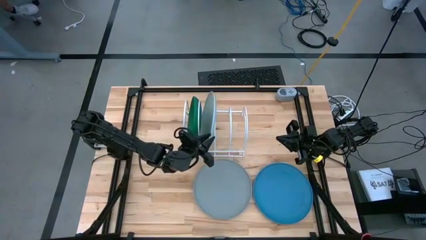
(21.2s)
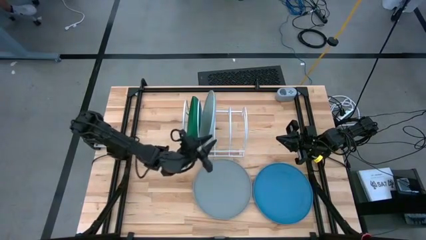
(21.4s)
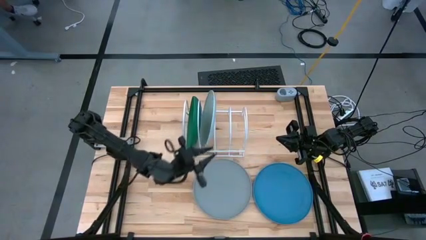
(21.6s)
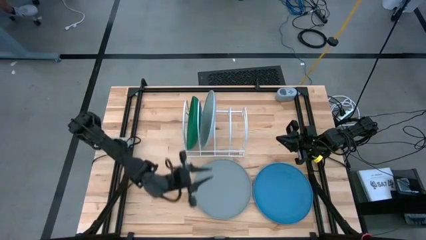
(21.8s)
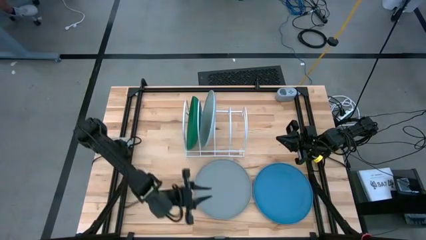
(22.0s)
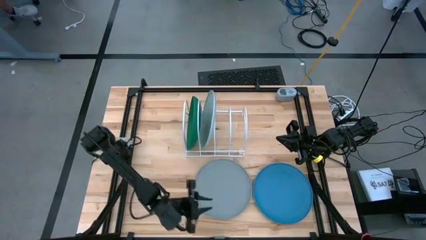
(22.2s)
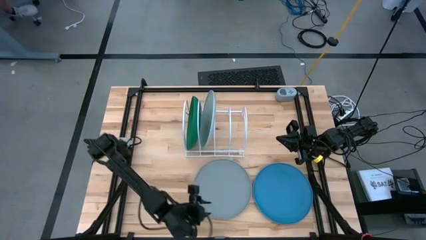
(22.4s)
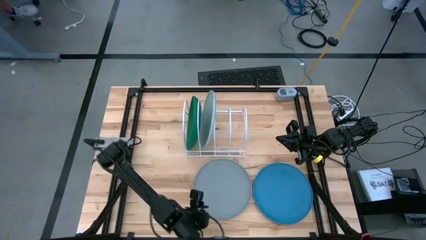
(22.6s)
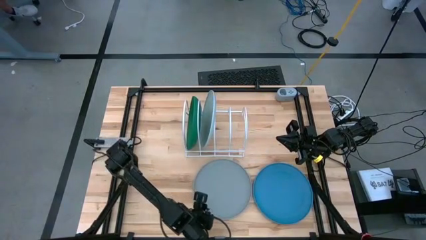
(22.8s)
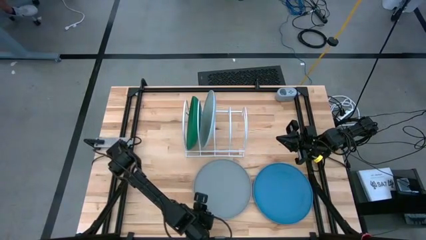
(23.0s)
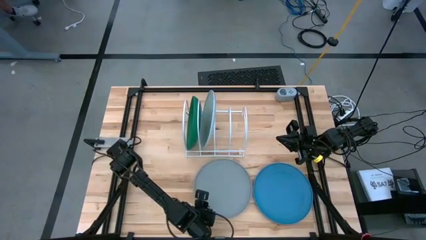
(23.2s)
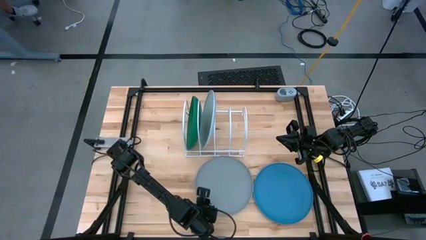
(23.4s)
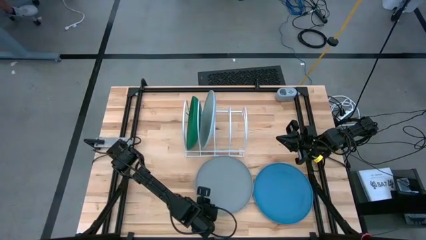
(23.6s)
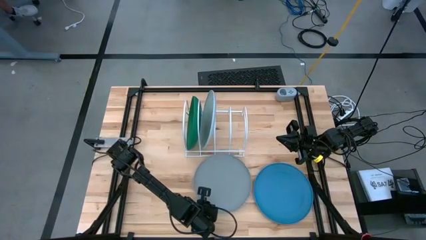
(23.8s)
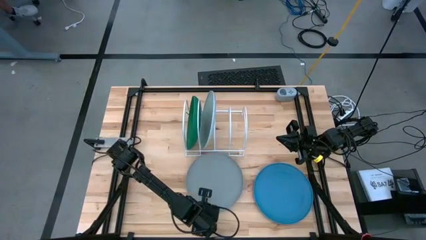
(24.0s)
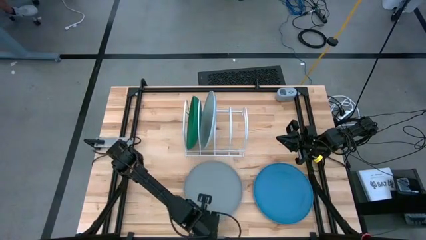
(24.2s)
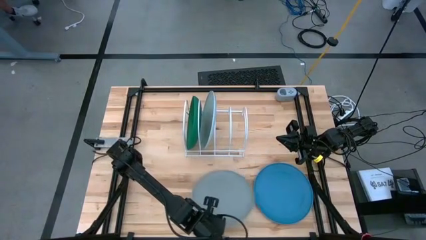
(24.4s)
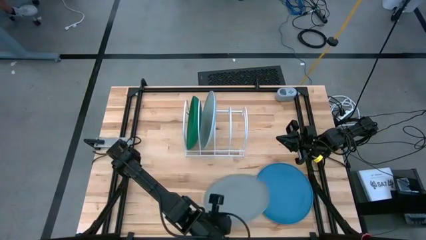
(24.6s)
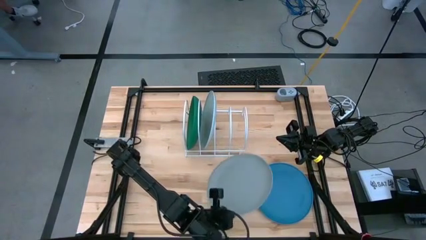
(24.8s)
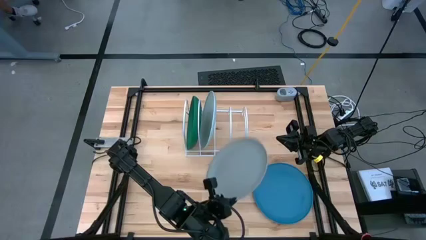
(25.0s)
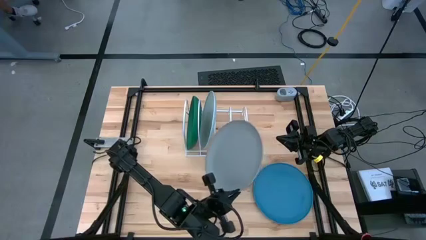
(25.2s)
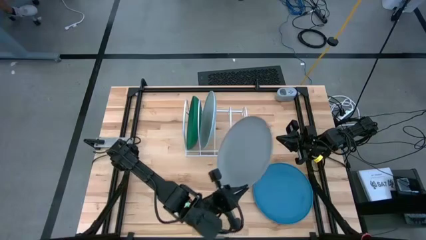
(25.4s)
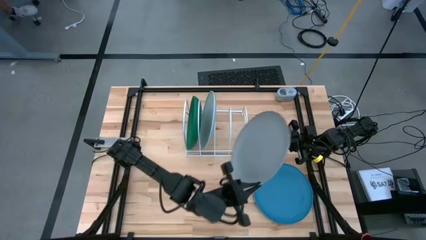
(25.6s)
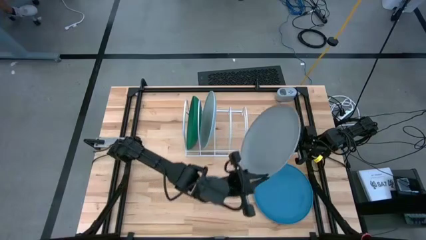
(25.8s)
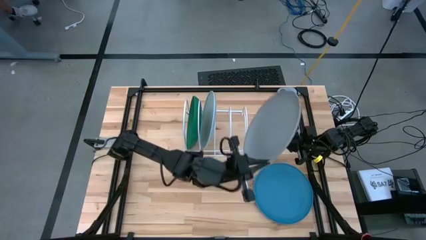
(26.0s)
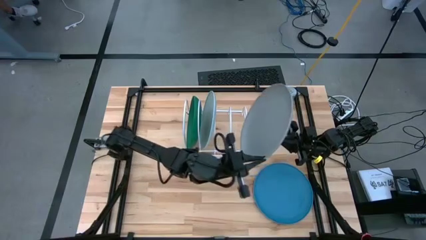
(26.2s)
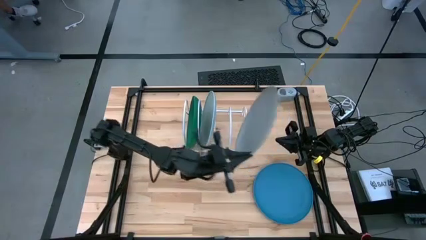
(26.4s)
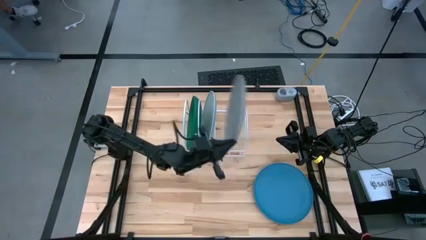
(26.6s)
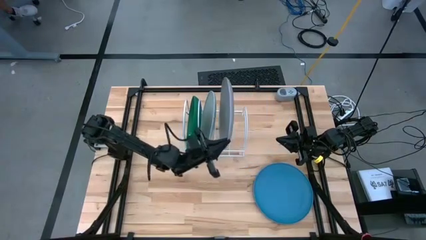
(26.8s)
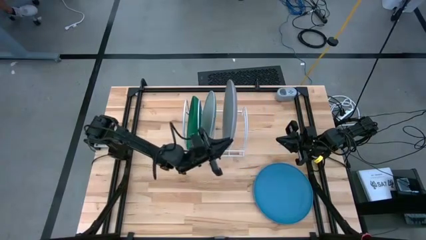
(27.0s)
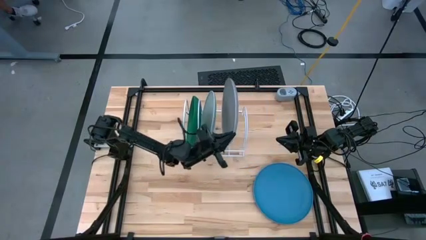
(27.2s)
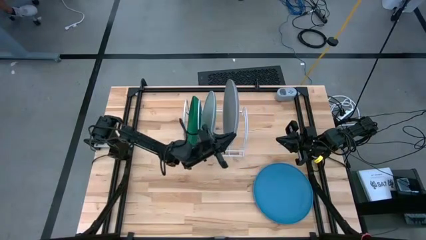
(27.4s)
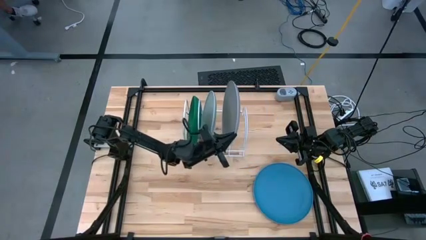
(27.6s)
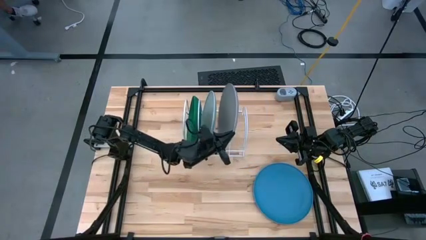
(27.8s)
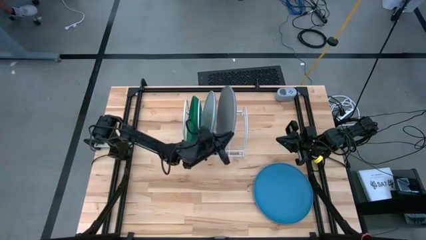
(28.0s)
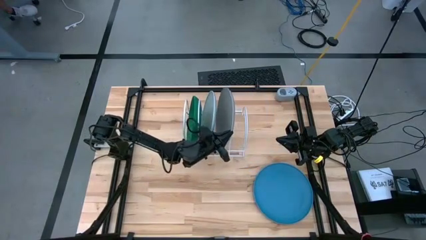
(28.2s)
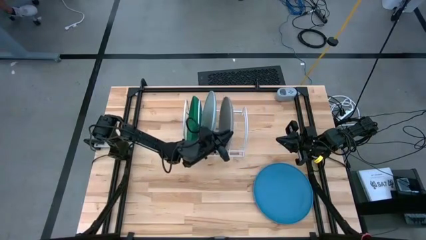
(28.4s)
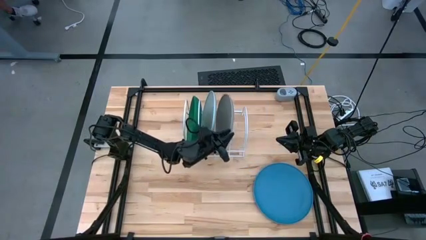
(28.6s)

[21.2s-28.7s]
Task: Sort dishes
Put the gray plate in the dish rack

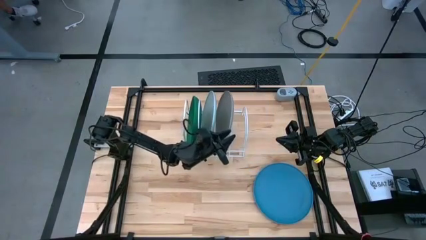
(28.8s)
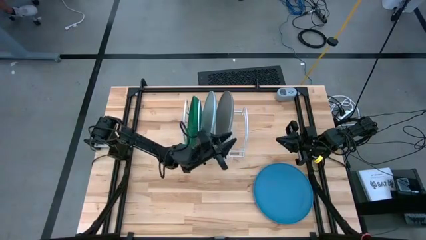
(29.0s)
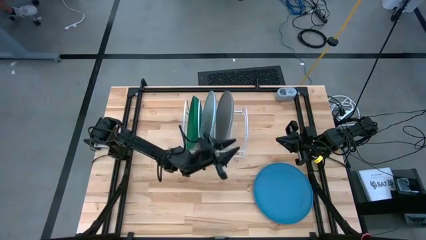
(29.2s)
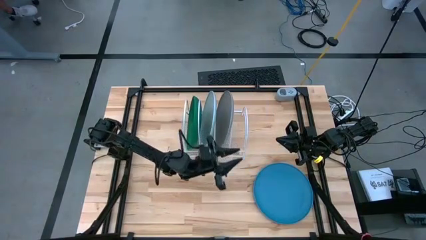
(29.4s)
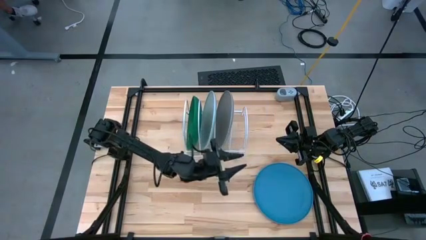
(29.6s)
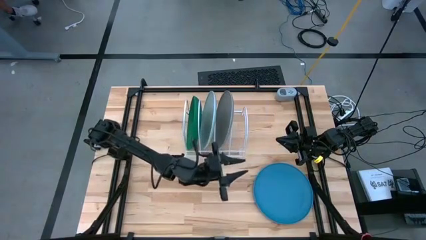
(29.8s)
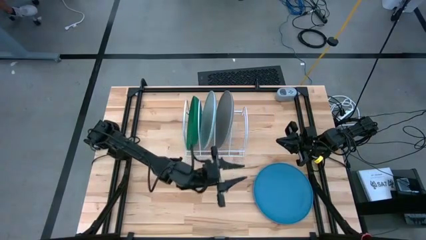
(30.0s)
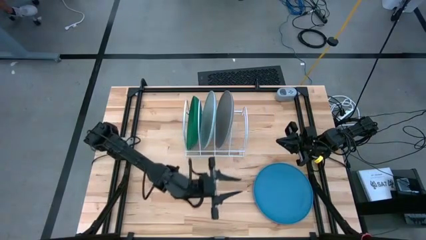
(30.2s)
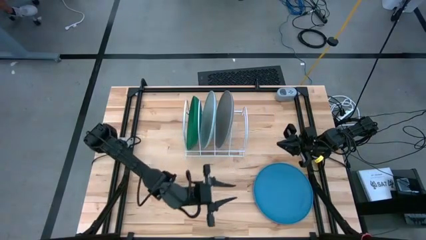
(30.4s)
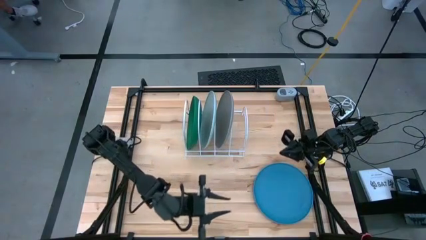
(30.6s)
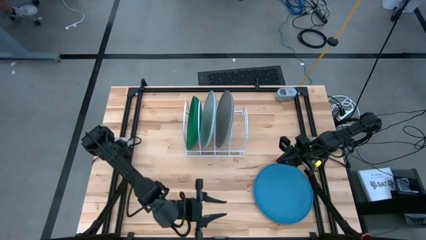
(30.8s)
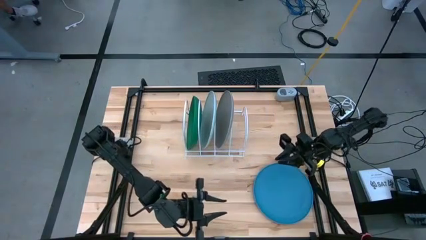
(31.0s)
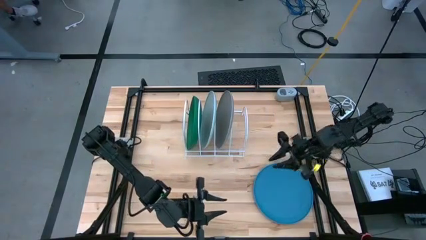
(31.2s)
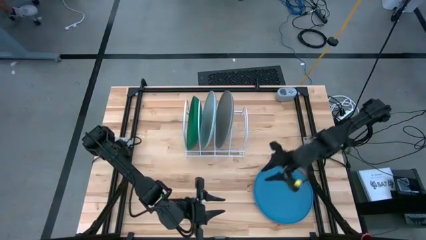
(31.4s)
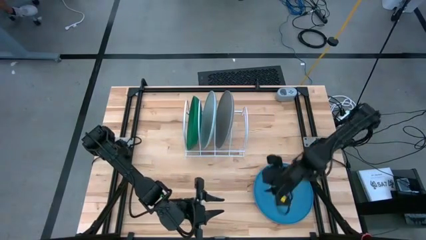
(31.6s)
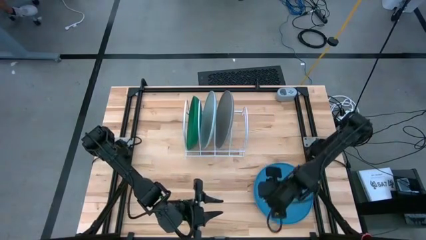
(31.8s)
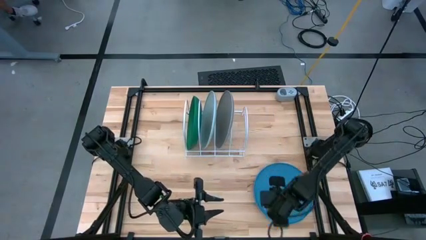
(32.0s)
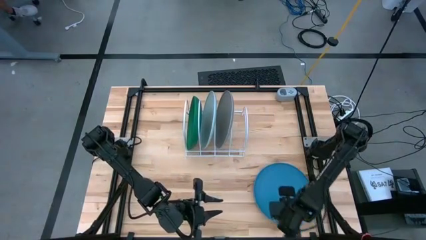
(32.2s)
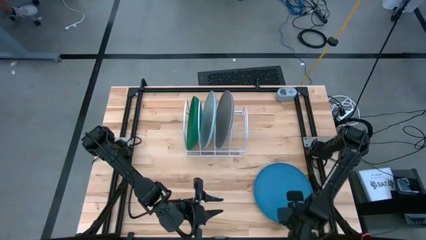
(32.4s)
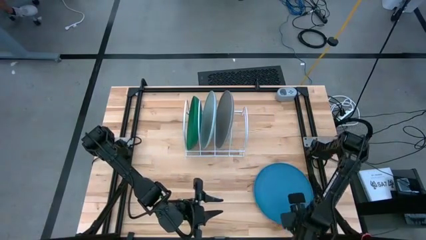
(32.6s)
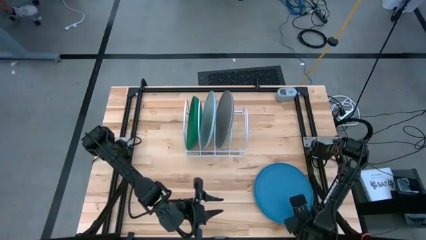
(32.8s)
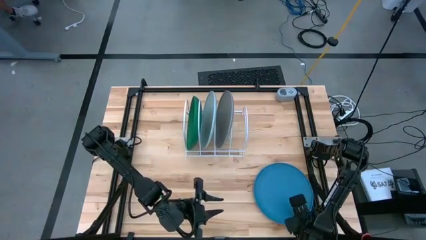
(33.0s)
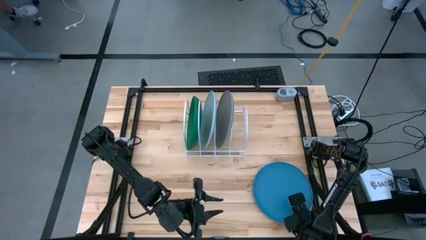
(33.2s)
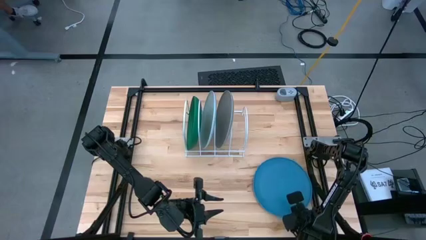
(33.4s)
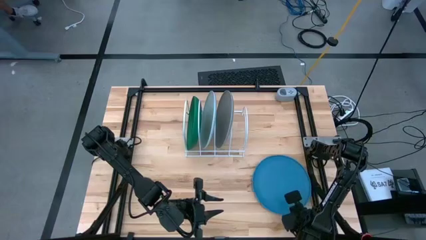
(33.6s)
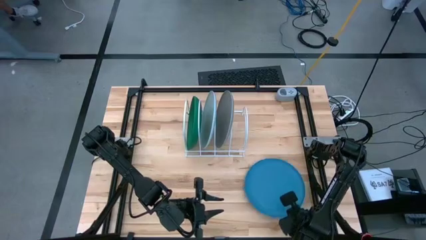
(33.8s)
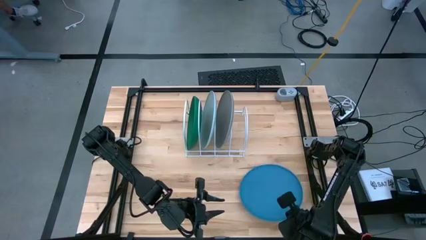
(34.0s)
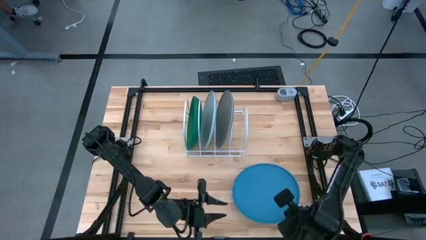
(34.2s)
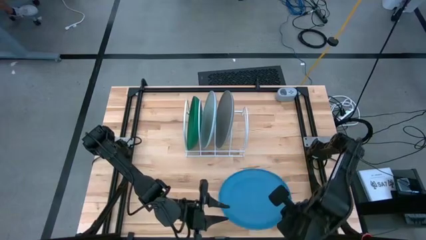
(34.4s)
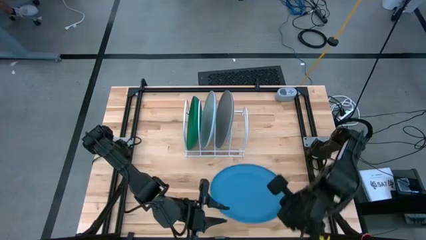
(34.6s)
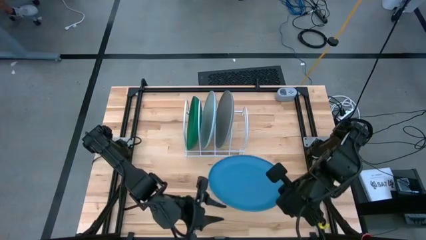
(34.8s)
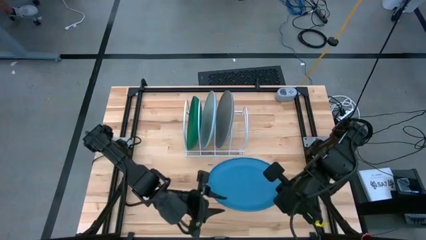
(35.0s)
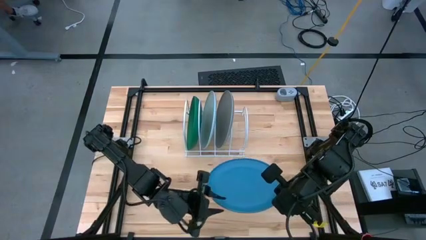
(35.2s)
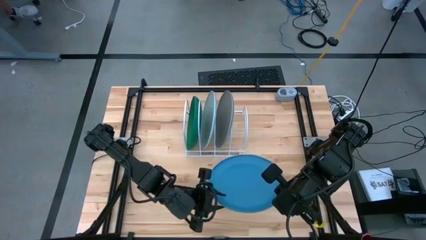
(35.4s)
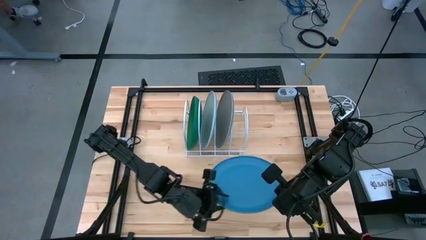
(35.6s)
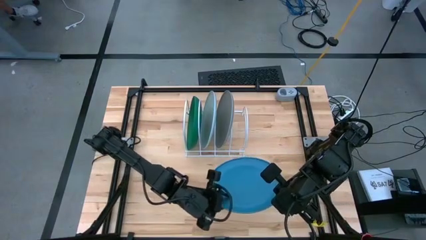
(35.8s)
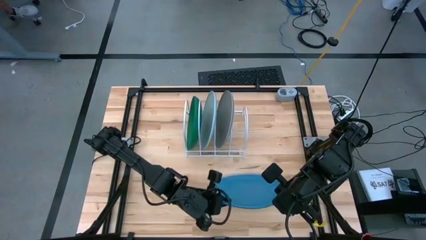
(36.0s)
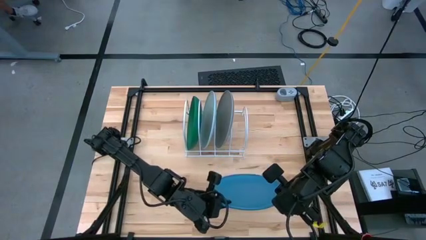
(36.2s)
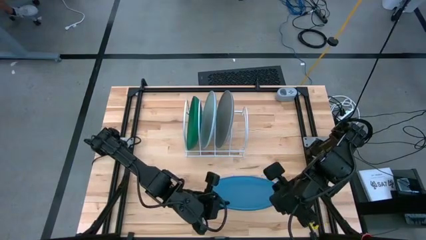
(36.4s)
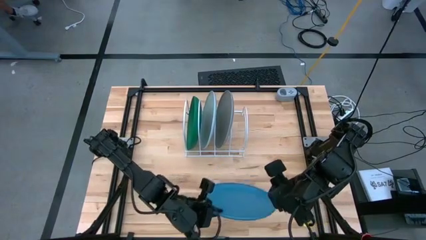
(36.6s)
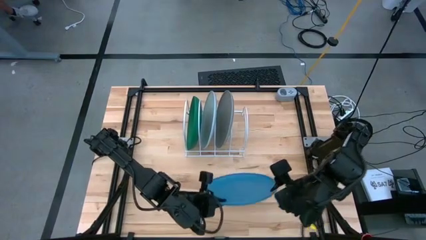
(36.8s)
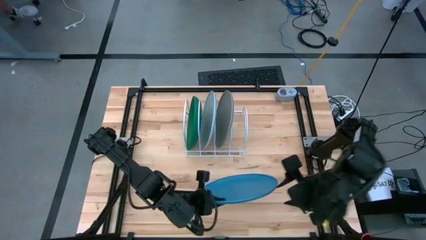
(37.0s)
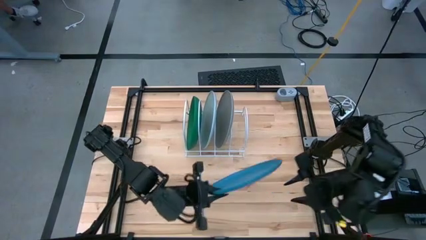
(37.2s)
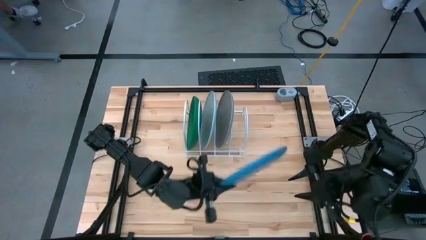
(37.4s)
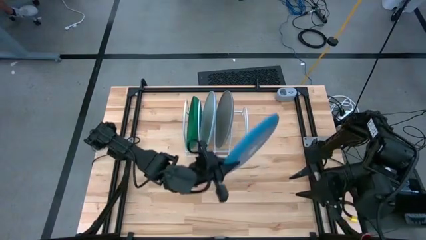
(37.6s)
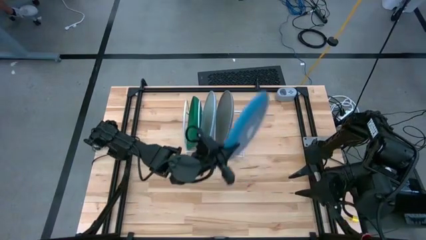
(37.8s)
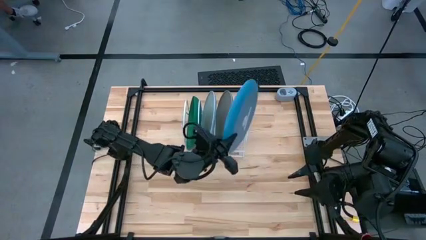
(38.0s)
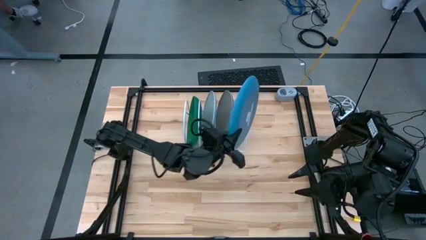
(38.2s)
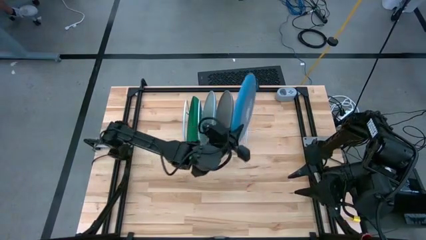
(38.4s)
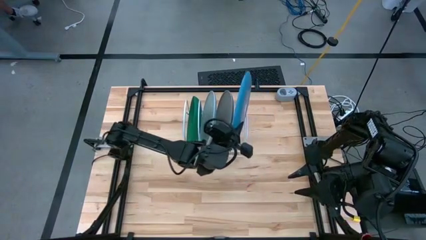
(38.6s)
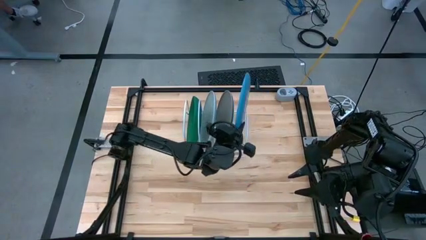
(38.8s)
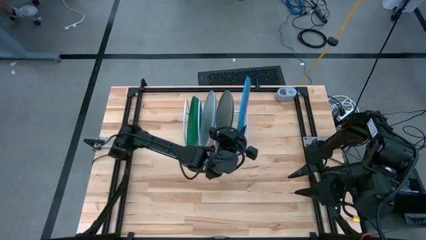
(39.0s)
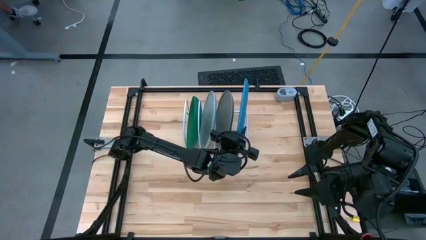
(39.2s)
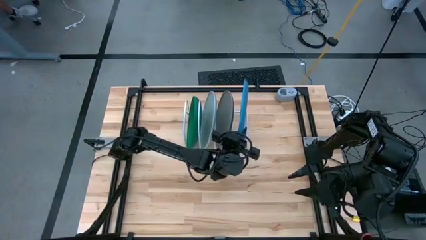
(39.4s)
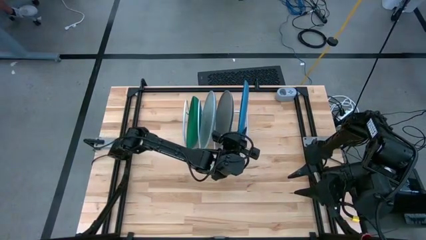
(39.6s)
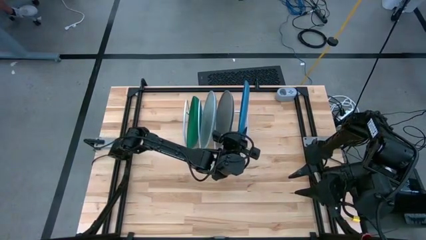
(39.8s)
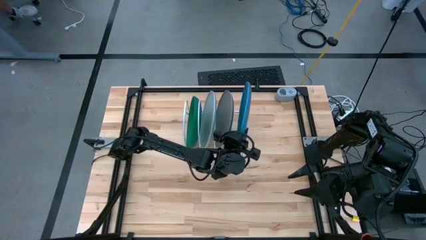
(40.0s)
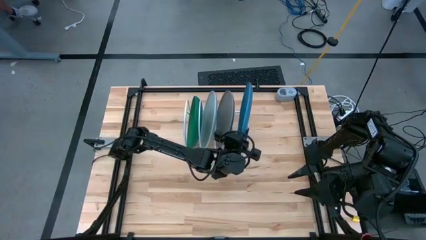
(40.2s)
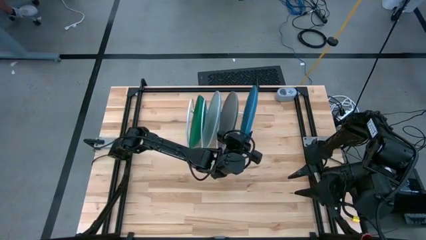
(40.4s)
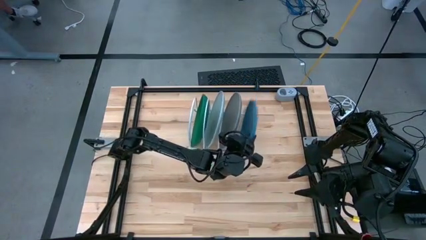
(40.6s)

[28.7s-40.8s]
Put the blue plate in the dish rack
